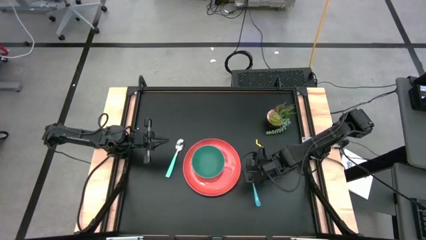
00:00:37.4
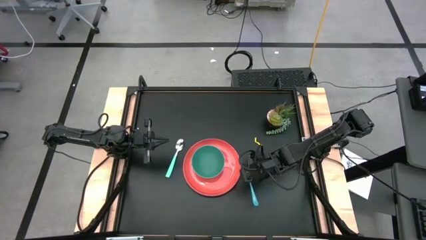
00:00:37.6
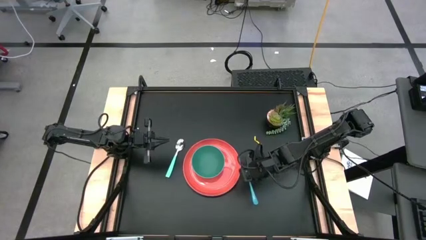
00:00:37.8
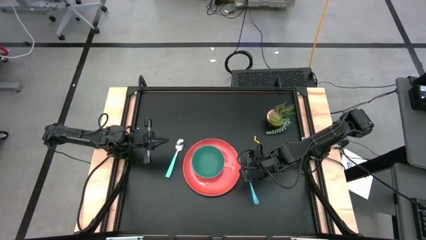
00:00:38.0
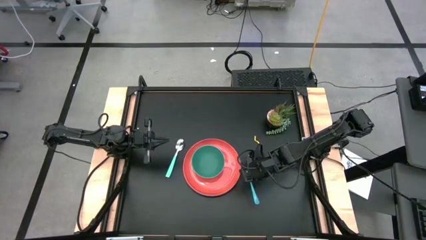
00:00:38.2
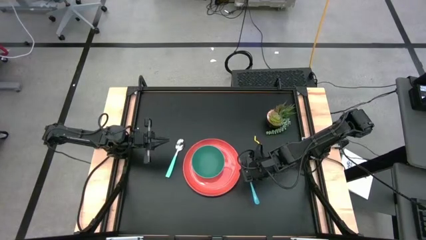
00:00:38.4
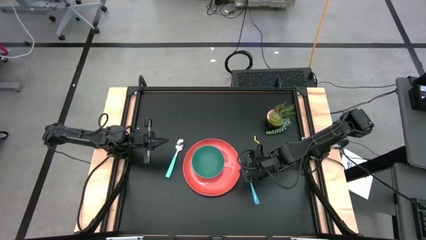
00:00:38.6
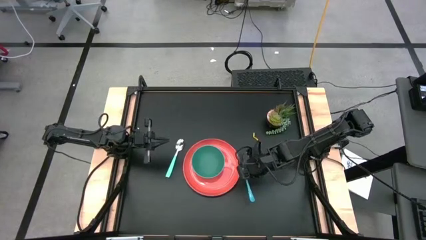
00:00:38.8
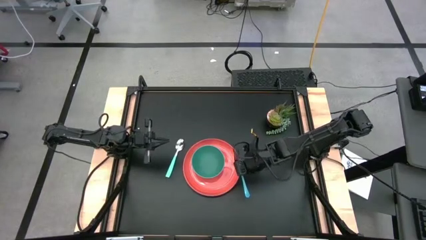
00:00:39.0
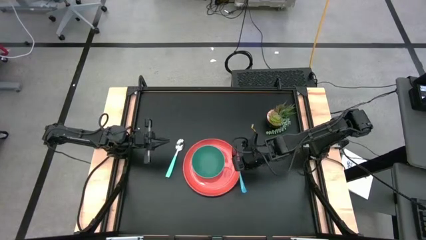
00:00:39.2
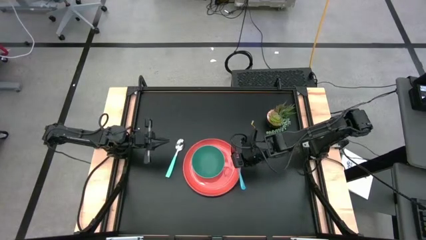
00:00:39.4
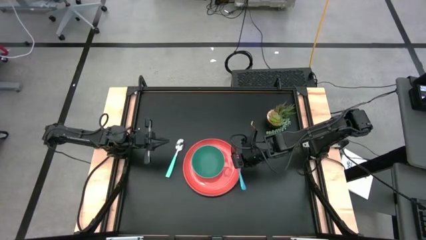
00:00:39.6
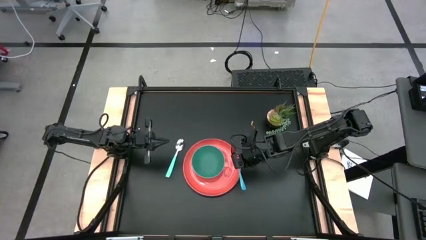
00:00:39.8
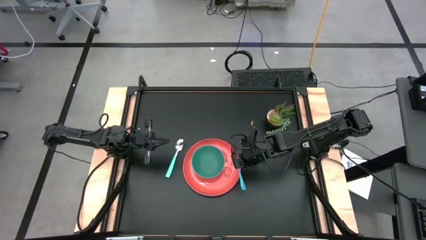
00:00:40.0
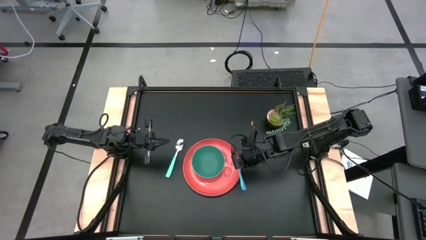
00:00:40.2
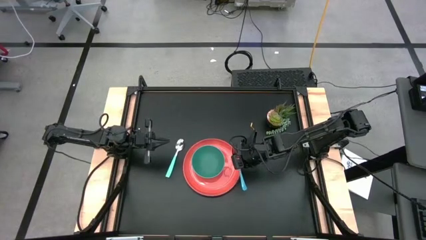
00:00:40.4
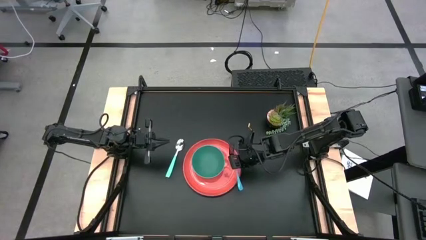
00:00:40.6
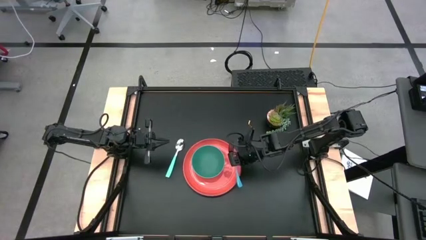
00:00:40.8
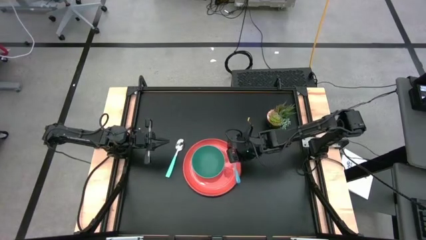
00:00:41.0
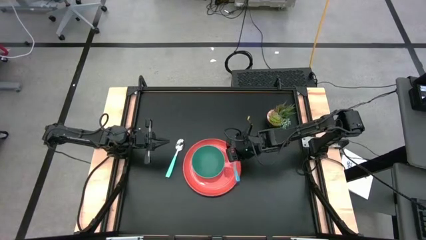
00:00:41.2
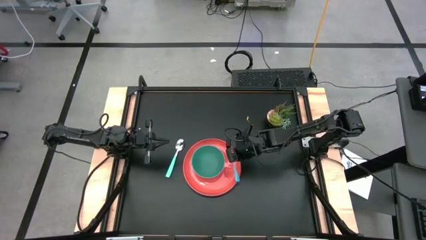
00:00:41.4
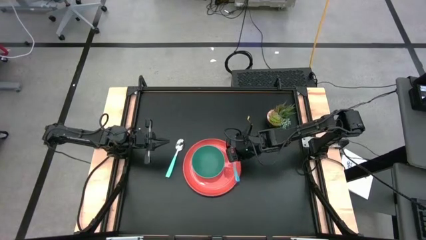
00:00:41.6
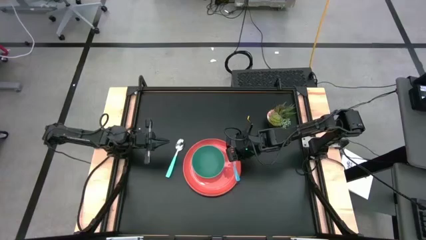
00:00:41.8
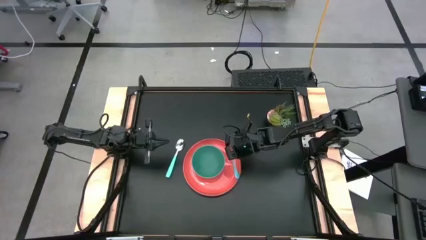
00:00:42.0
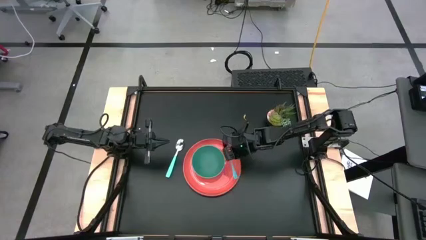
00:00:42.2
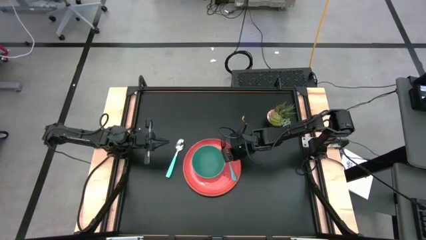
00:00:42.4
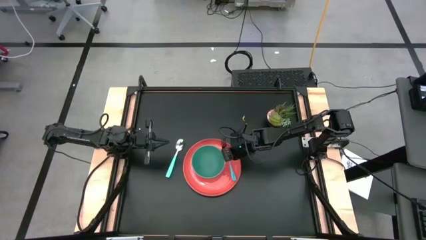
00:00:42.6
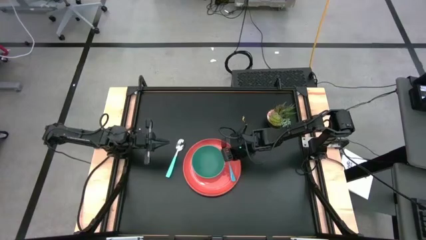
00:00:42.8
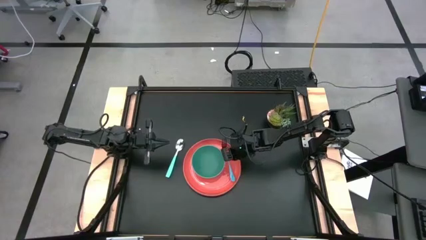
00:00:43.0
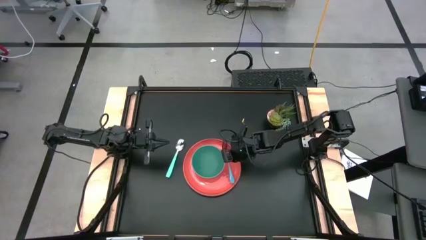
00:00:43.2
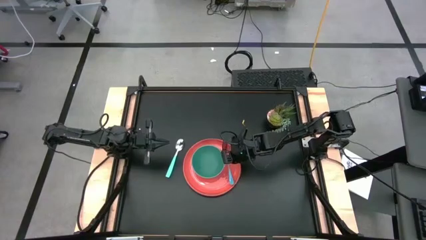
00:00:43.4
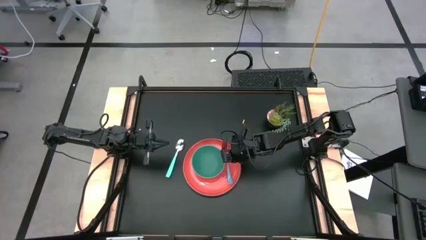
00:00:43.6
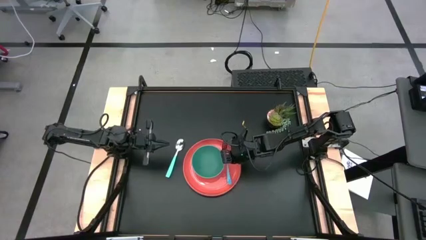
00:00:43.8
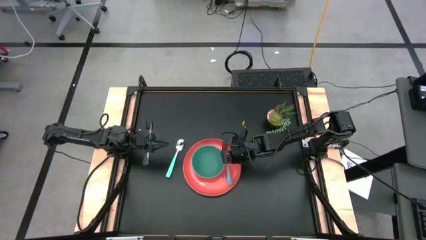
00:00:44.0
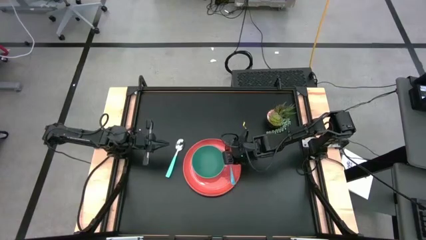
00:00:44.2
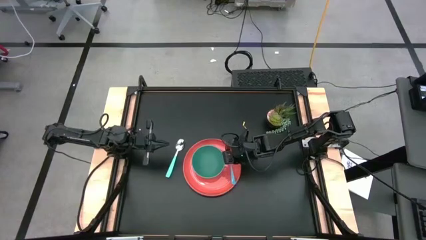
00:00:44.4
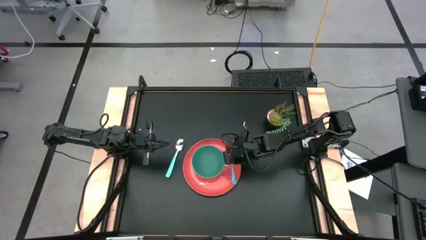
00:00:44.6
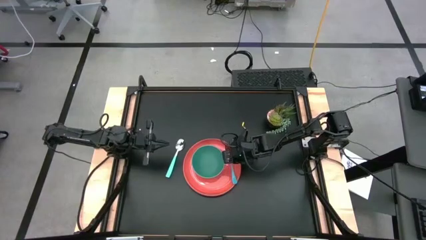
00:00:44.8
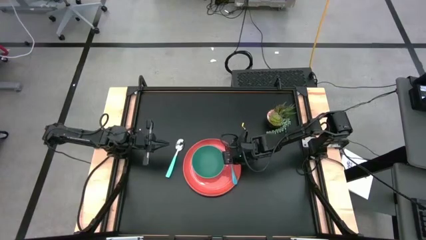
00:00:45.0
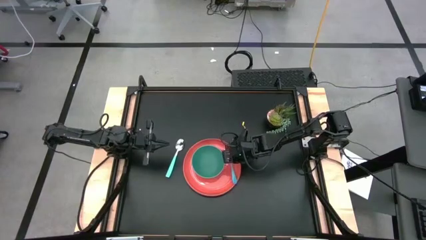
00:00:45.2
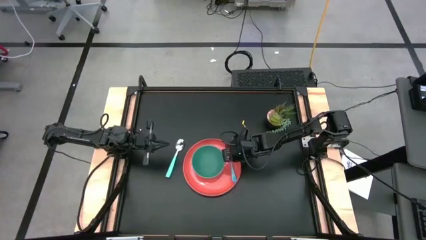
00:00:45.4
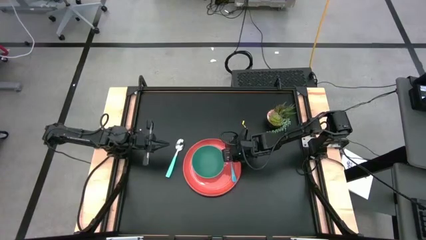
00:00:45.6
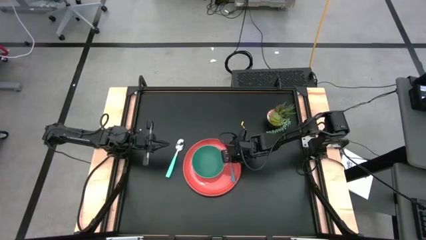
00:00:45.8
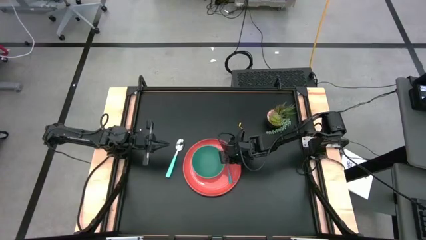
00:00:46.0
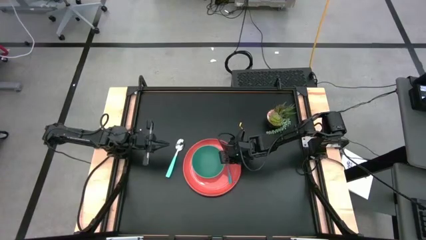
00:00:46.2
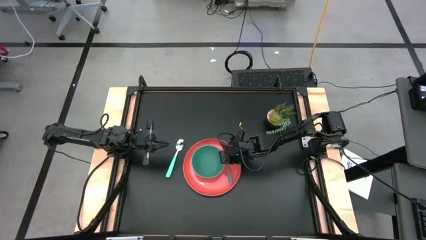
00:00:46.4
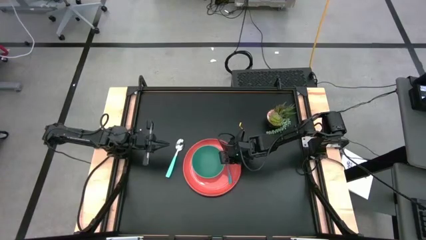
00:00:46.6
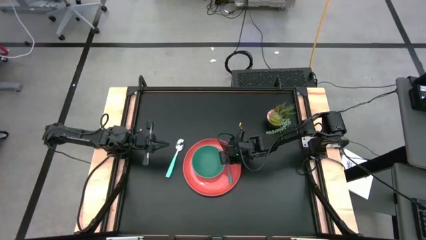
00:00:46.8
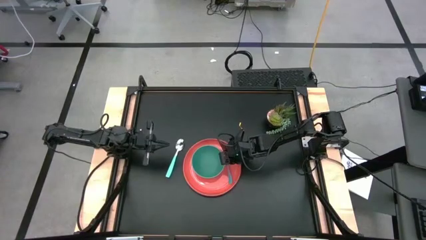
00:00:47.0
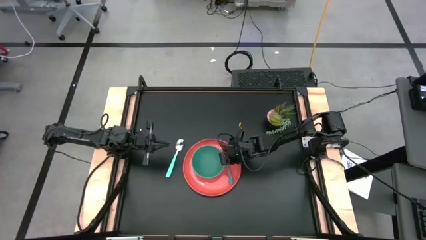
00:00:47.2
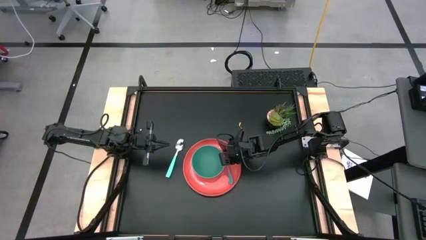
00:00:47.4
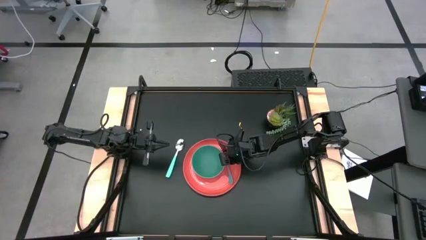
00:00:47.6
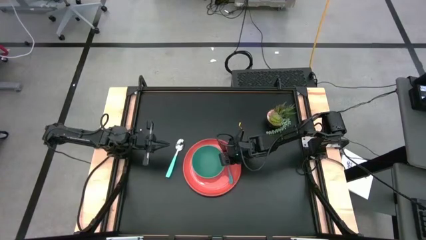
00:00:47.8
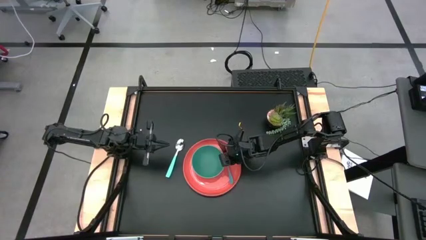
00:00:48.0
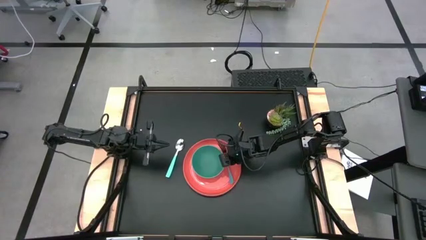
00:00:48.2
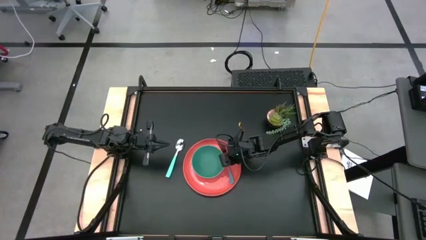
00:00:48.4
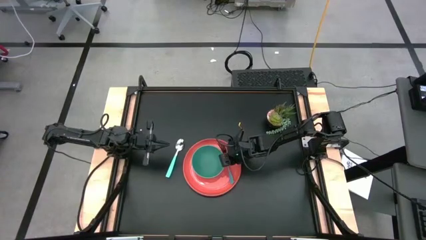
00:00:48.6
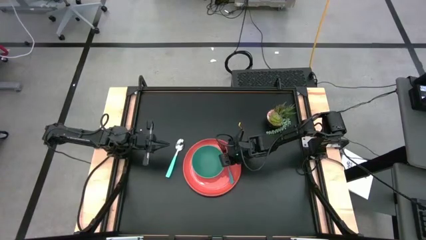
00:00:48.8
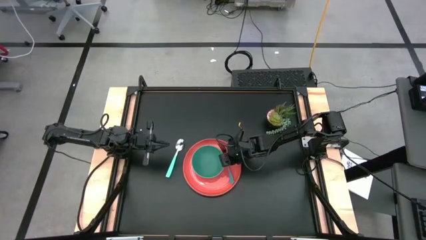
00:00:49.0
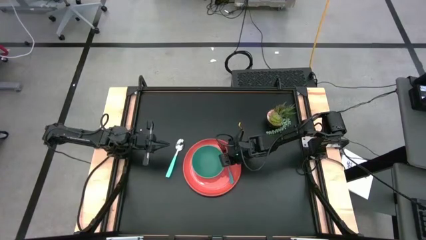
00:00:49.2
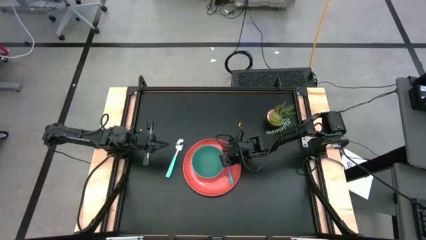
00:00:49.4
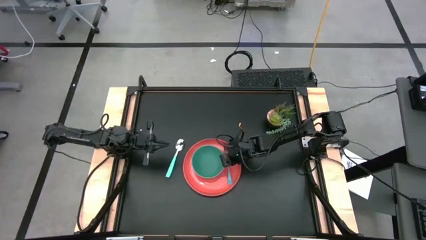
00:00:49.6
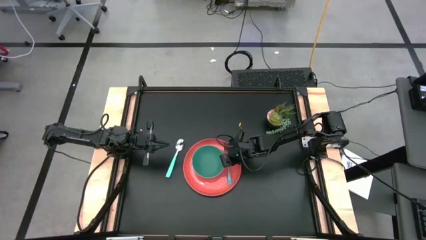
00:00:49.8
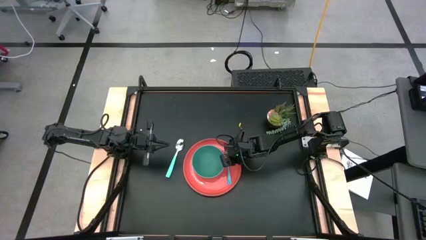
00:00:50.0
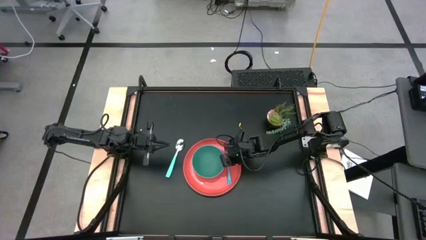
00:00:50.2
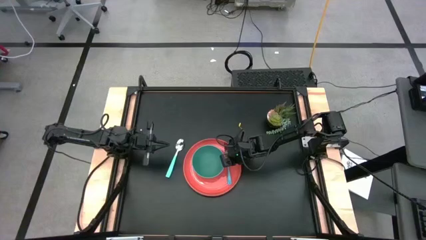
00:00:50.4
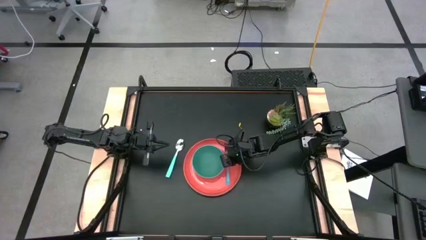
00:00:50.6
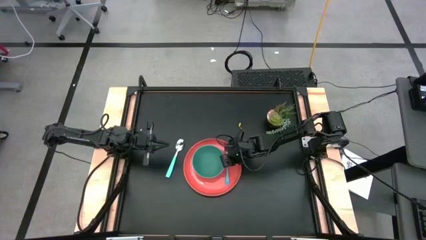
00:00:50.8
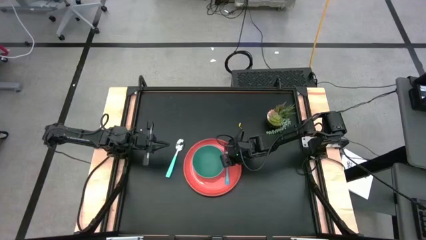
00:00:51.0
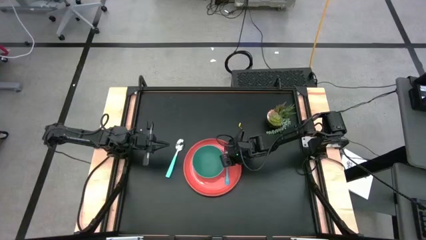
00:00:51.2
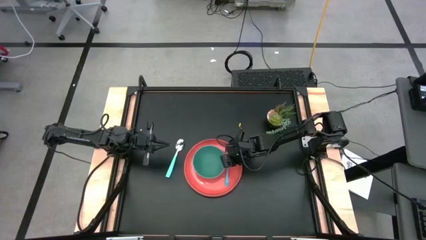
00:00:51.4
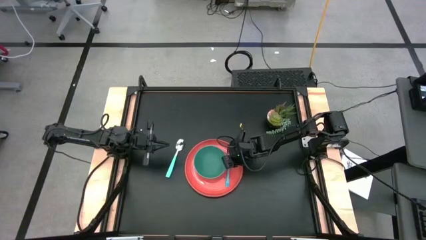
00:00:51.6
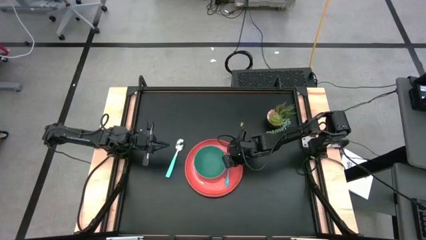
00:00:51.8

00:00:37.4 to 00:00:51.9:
Task: Set table place
Put the blue fork on the orange plate to the right of the green bowl

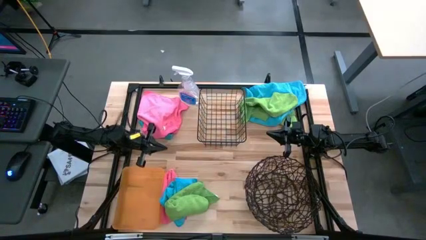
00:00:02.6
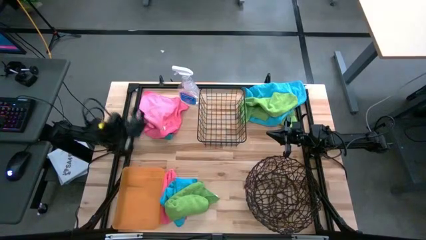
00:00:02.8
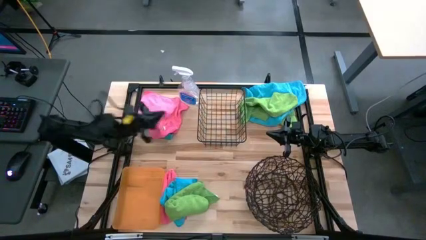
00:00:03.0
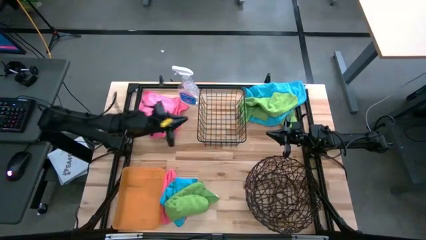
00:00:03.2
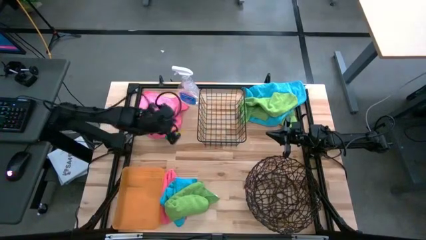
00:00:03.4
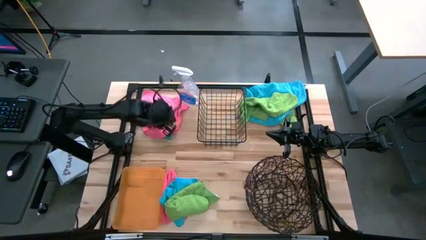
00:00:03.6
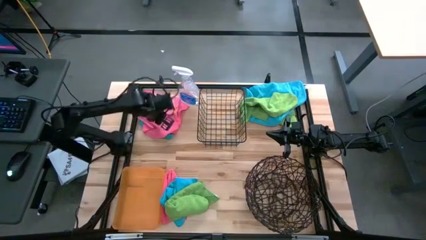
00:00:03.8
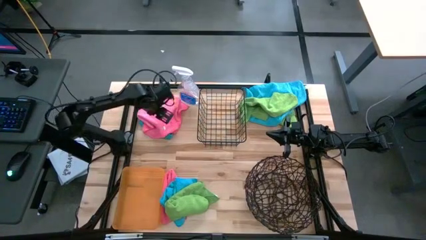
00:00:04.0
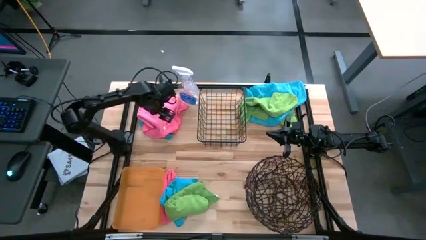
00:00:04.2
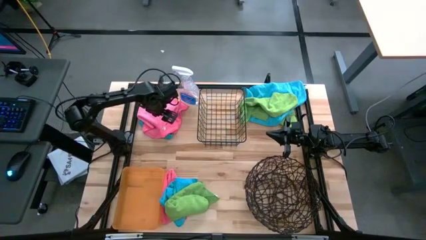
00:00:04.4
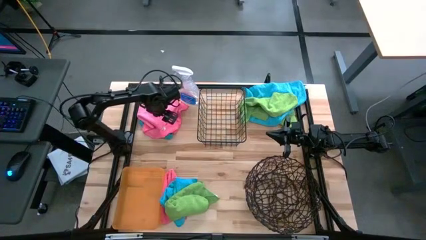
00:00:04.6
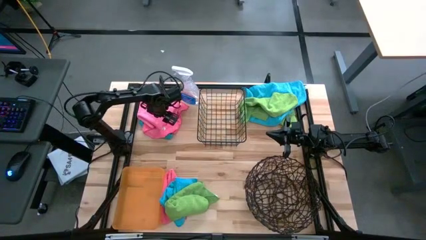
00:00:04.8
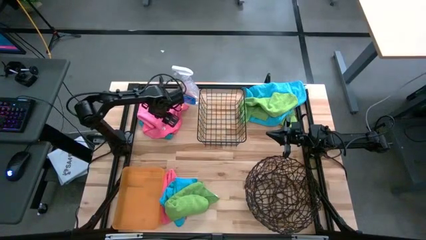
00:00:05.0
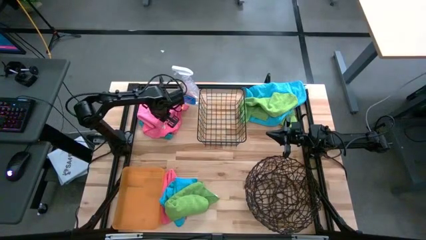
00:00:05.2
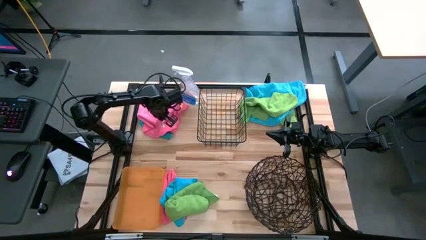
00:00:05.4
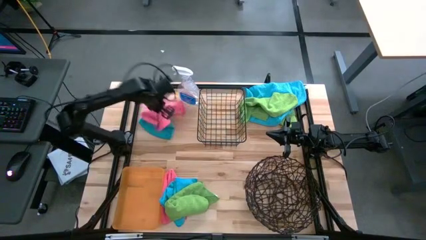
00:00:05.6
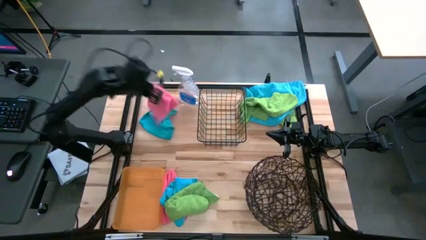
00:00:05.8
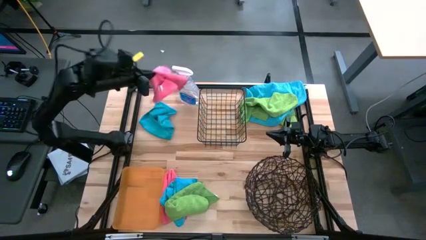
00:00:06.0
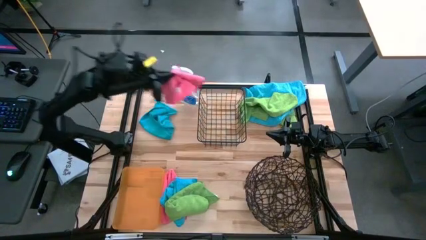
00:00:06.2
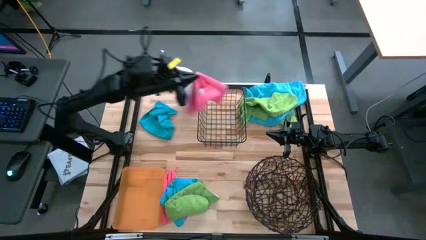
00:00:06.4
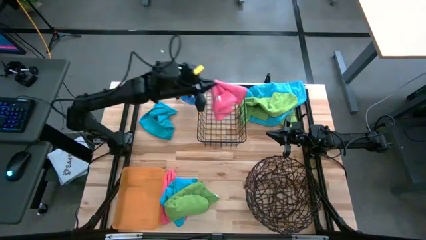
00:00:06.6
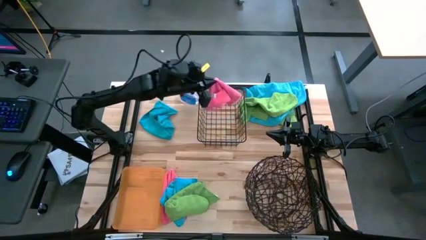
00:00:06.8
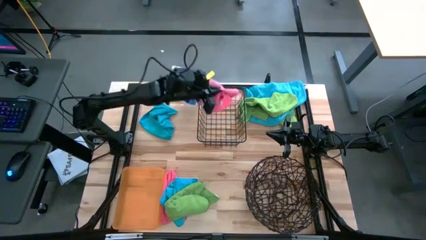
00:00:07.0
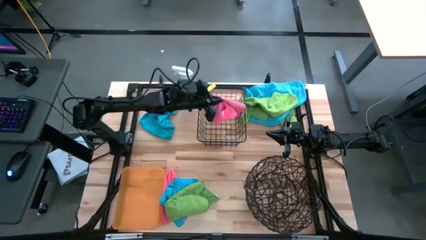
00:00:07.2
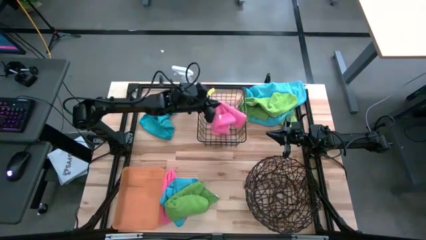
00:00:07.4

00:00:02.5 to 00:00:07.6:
Task: Sort microfiber towel by color & place in baskets
Put the pink towel into the black wire basket
